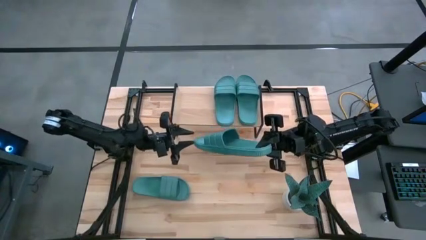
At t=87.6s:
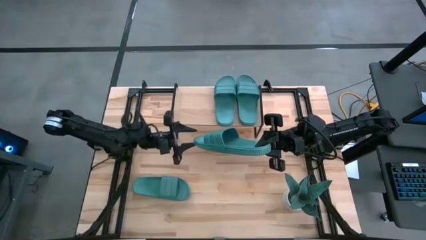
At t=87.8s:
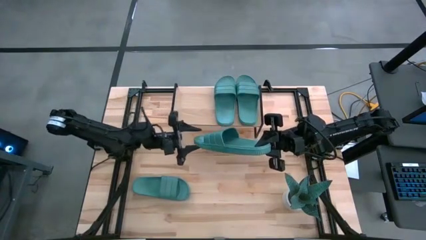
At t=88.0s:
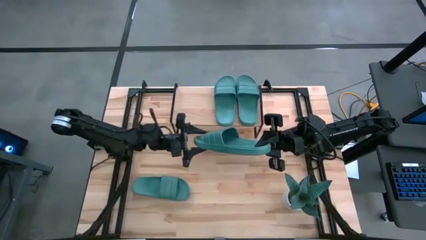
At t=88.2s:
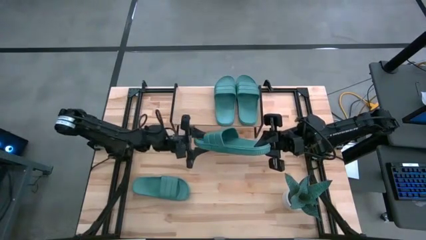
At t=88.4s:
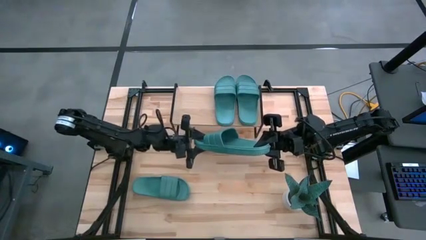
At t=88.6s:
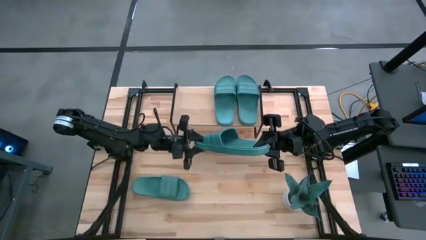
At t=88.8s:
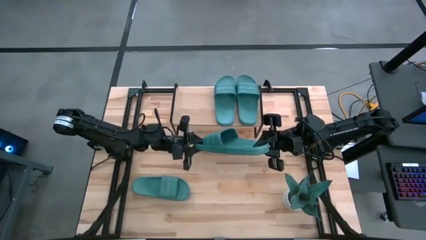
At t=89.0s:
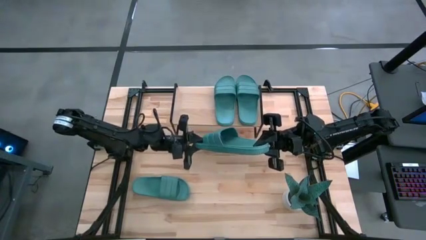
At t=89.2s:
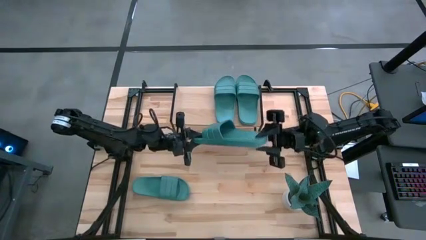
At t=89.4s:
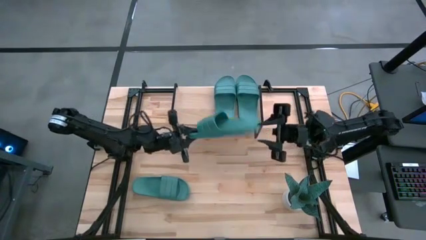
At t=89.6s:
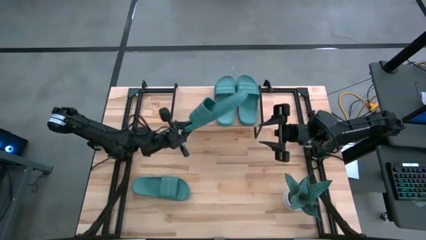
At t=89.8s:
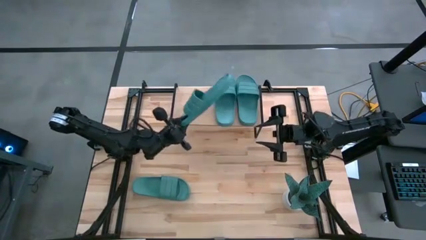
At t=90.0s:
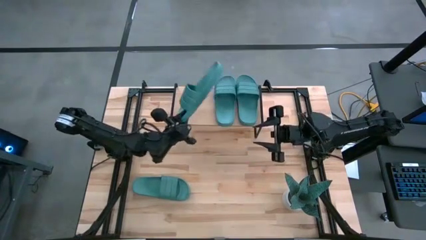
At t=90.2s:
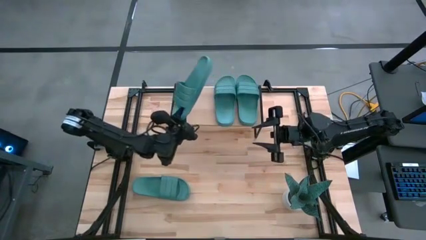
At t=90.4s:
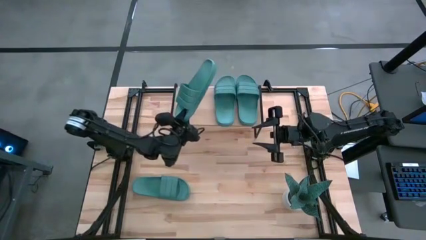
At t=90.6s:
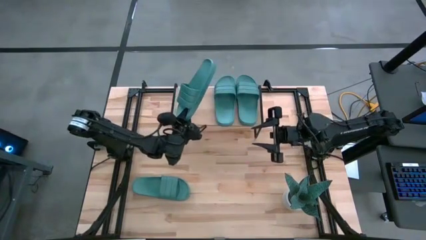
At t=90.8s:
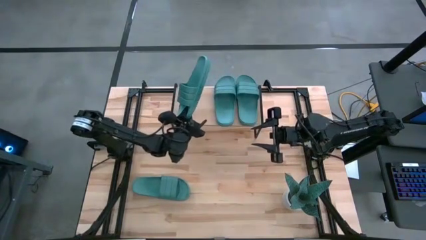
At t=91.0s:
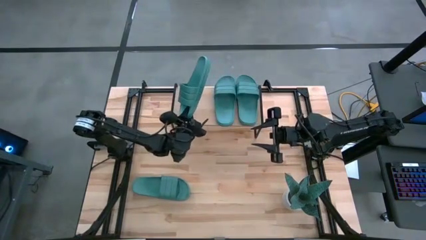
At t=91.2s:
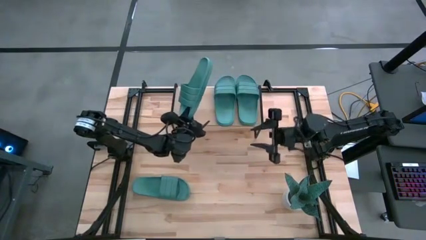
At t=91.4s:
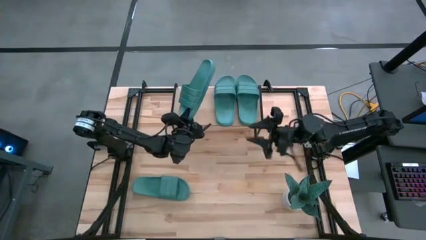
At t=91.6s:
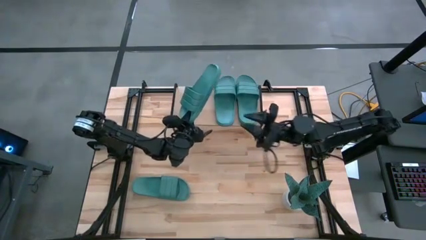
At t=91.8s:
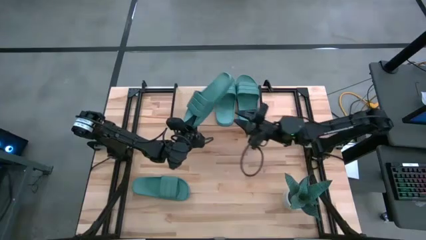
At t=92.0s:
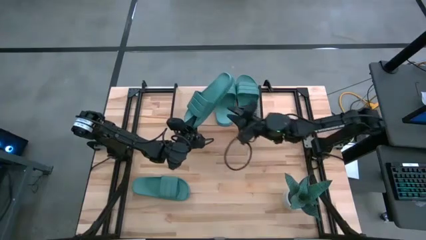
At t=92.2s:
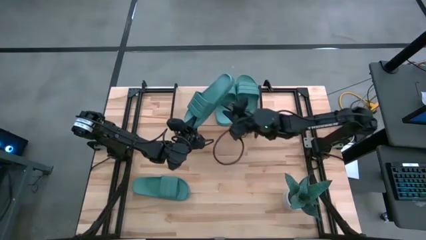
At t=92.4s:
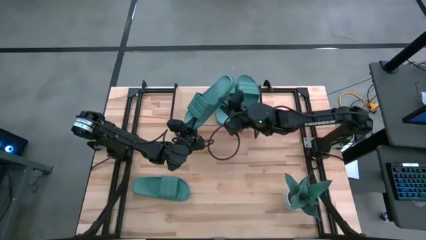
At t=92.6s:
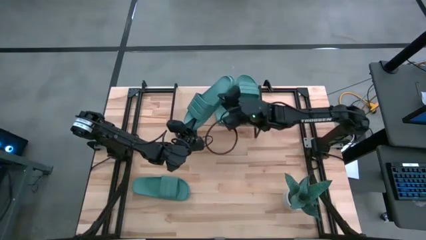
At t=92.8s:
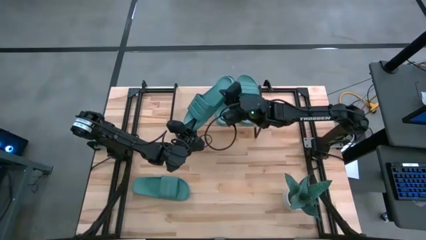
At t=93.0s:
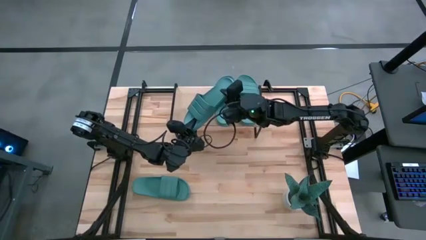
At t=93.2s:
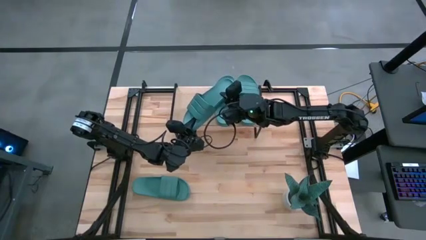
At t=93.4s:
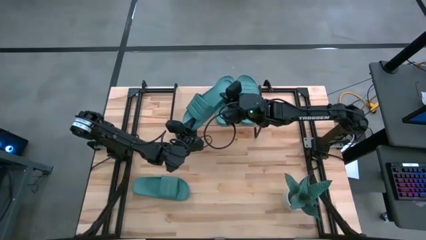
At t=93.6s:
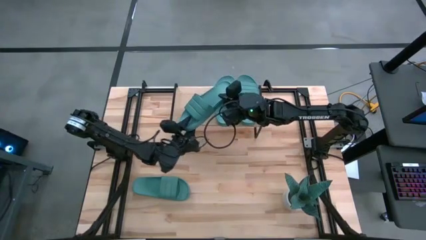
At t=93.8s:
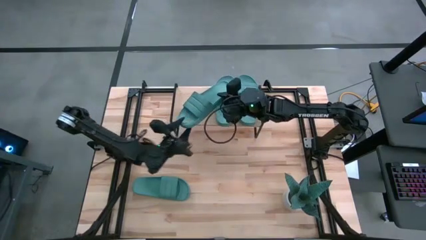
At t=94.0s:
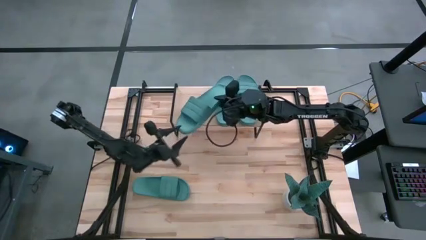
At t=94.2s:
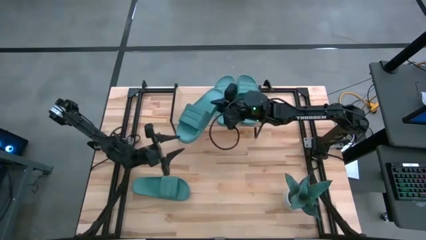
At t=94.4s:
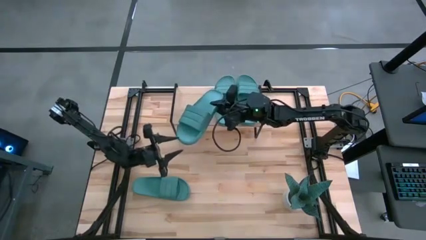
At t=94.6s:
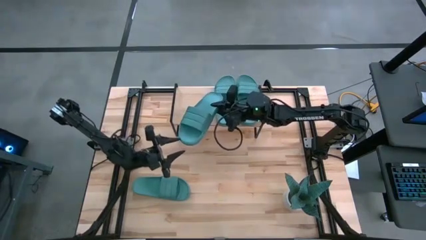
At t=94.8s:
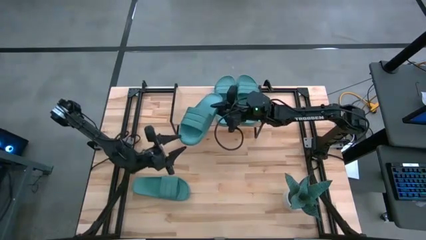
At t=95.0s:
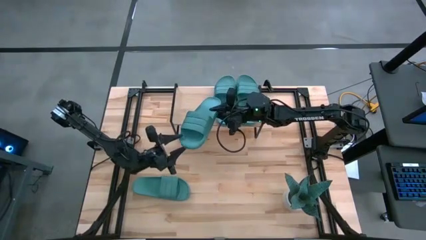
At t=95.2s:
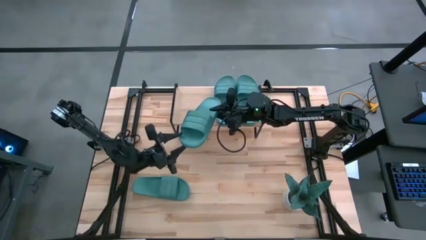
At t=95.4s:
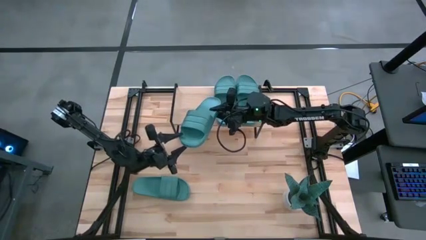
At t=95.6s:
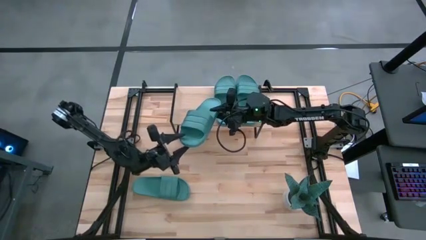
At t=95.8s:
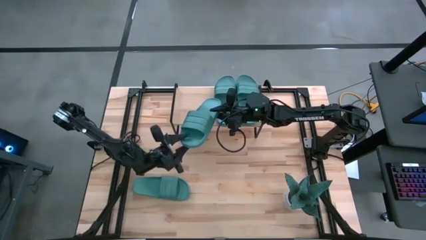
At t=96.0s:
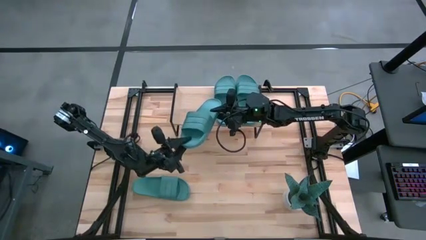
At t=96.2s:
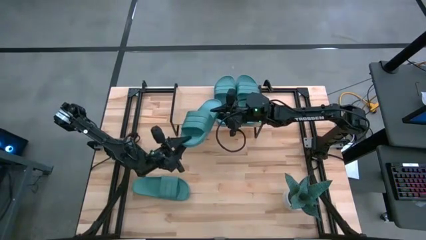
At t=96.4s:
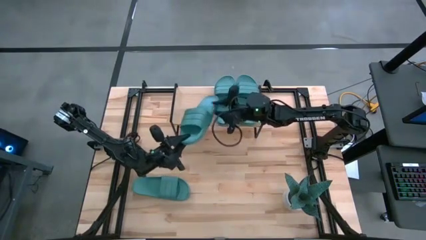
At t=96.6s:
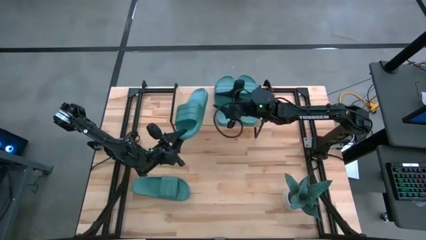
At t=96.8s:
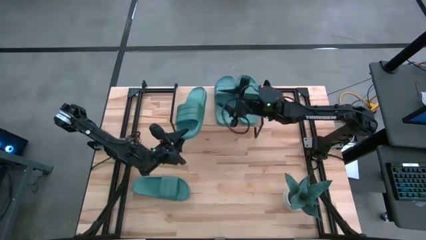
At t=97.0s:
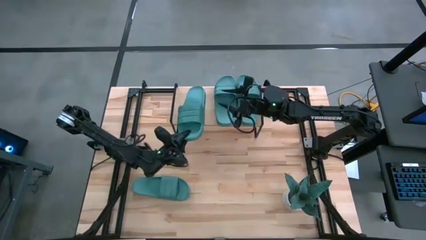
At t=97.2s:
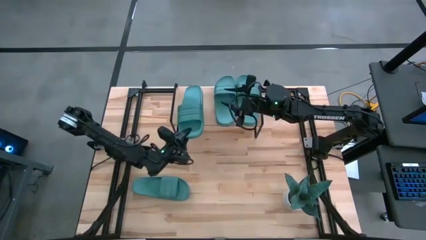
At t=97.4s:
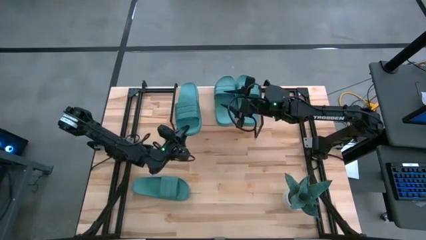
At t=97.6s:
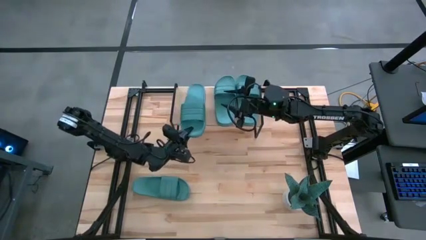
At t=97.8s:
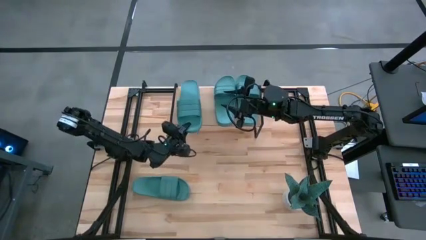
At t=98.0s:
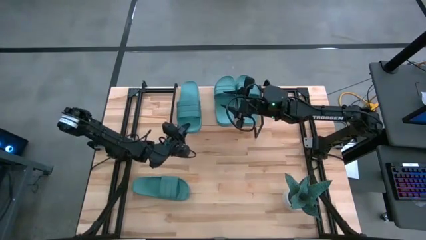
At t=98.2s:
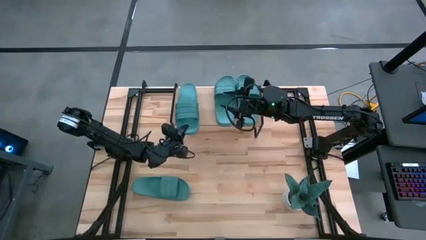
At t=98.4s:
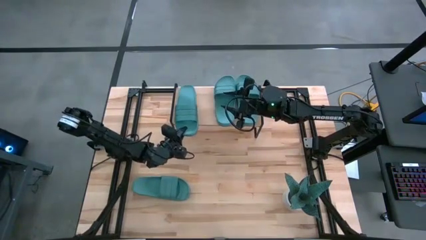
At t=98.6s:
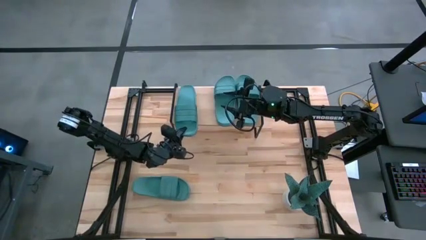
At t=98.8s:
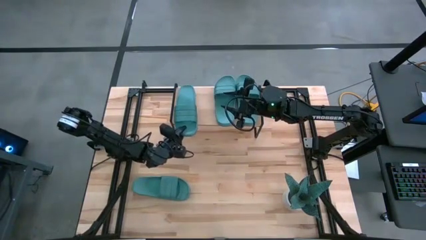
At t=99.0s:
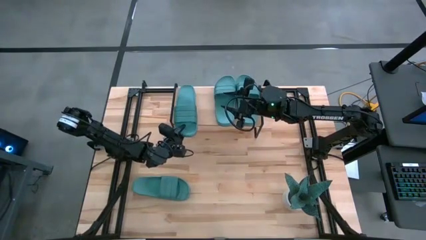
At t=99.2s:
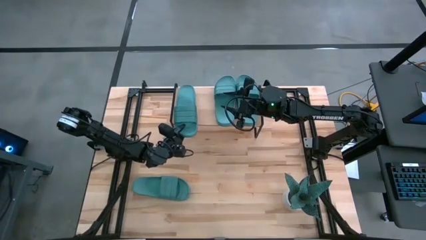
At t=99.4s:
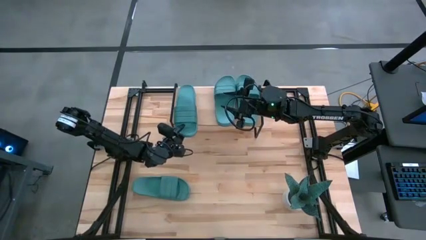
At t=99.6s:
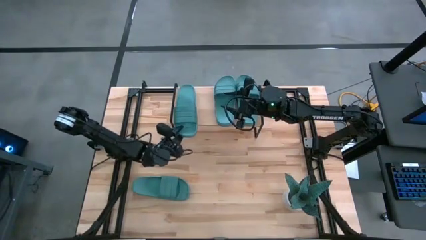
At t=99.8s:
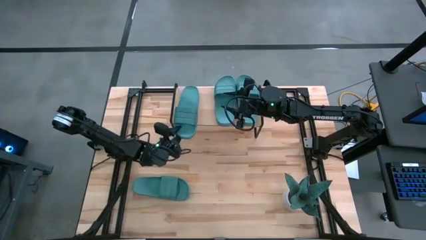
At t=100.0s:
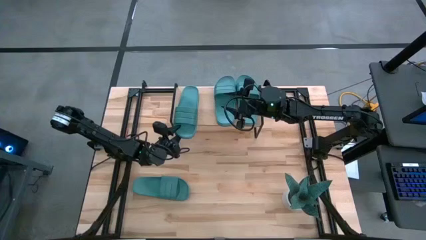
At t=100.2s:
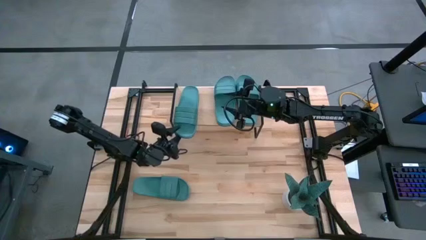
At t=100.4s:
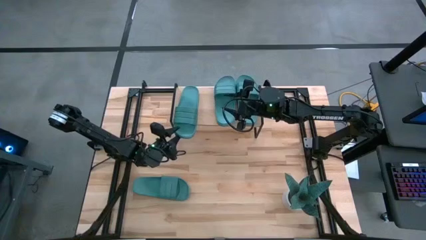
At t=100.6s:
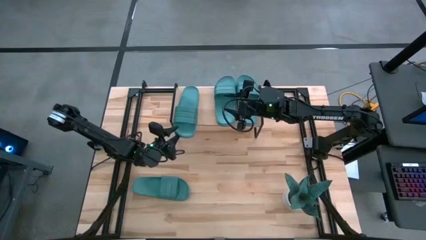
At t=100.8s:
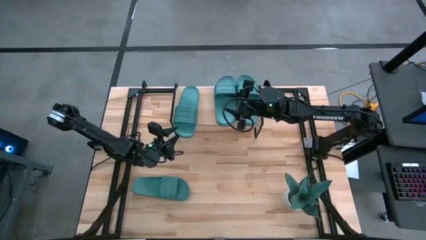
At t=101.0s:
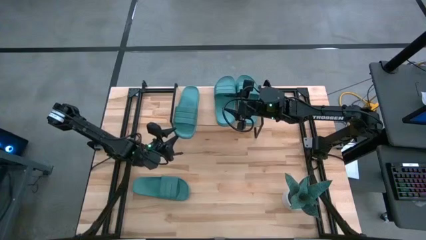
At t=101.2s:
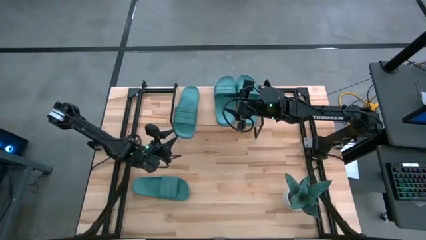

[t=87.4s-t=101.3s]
Task: Pick and place slides into the shelf
Put the green slides on the shelf

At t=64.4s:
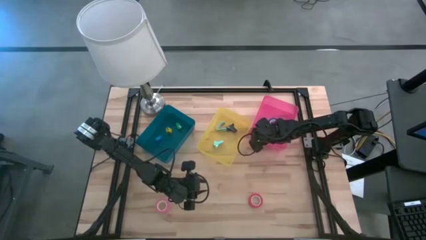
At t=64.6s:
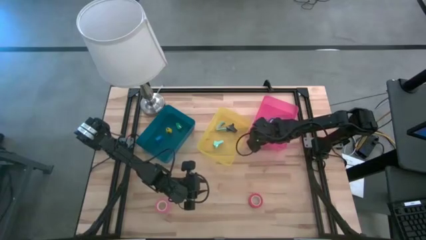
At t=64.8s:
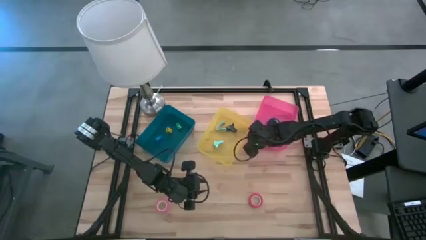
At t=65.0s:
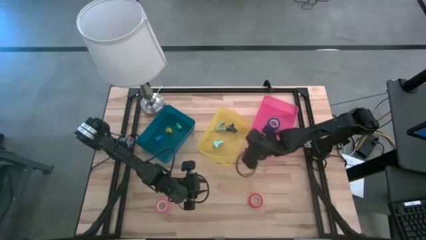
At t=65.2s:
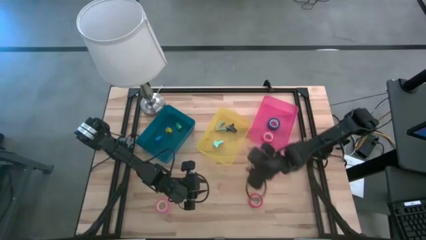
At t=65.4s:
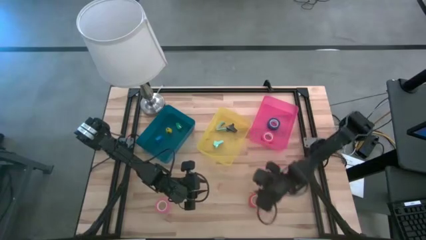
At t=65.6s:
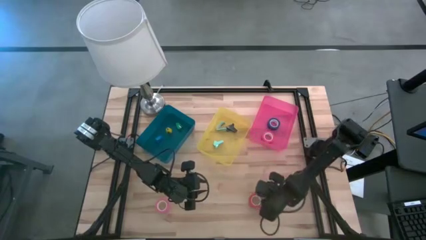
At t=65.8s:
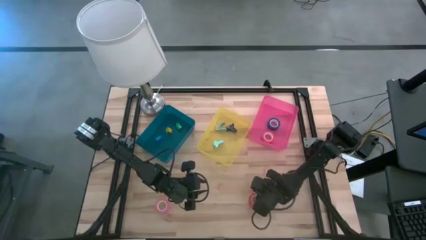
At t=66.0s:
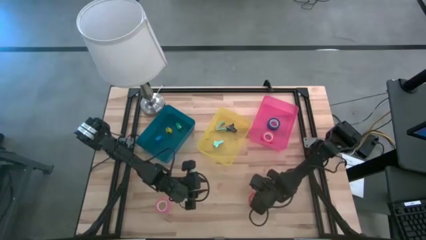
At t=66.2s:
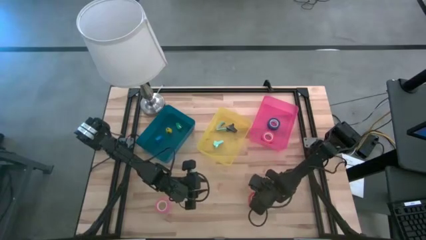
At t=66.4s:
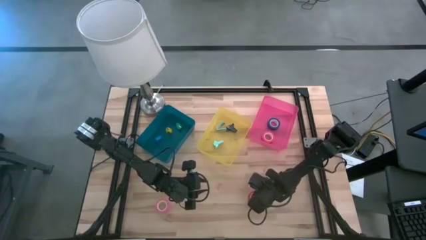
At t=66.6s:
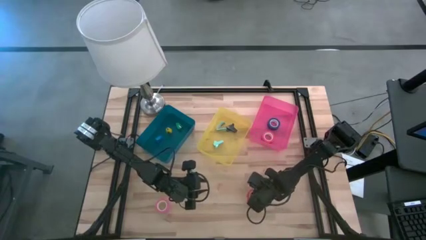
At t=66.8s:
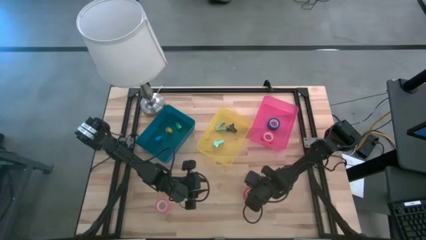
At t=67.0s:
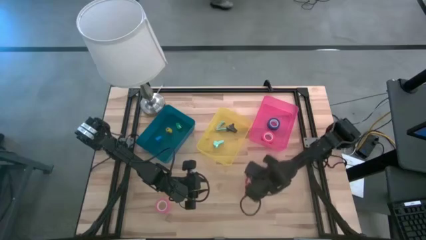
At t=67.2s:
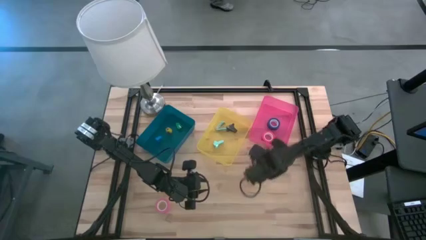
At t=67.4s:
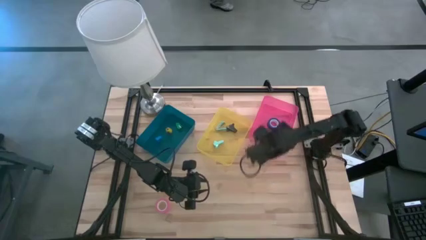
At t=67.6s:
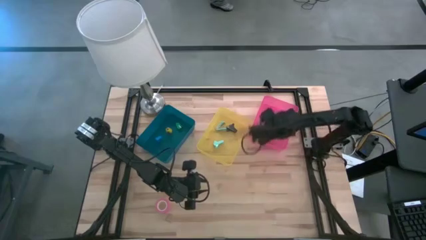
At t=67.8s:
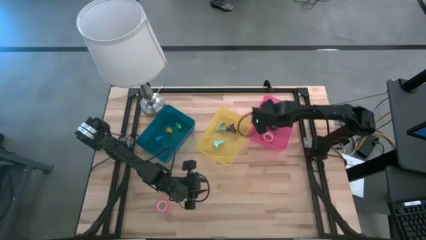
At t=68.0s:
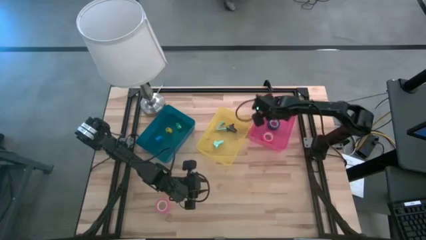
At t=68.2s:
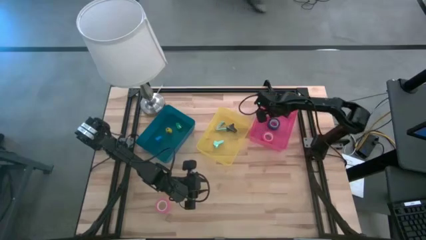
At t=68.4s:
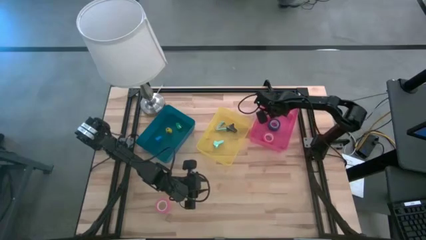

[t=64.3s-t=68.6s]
Task: Pick and place Stapler, Stapler remover, tape
Put the red tape into the pink bin
